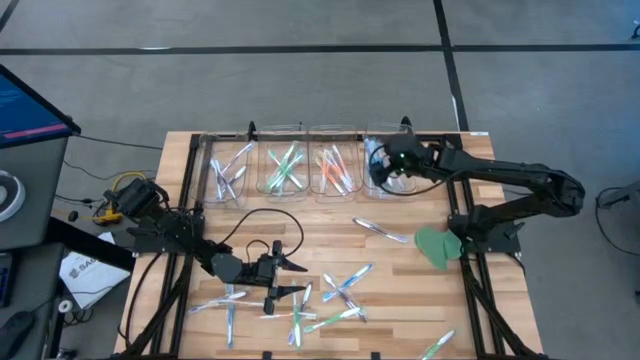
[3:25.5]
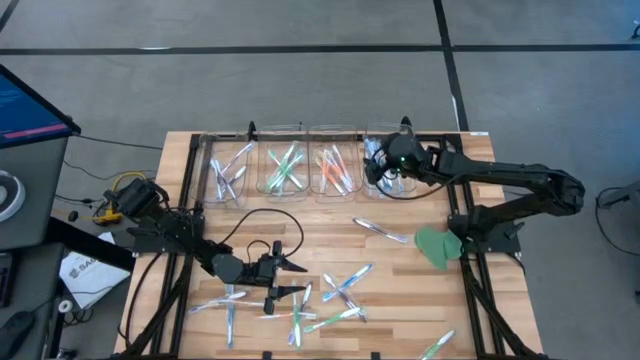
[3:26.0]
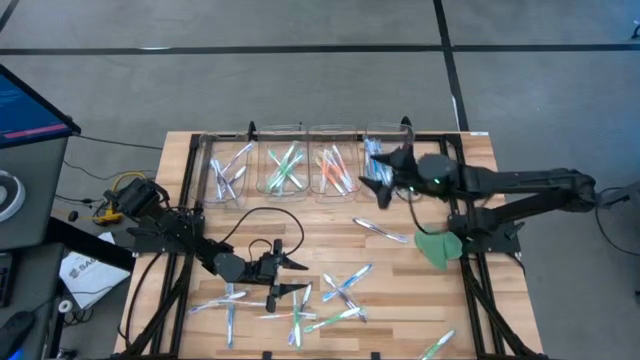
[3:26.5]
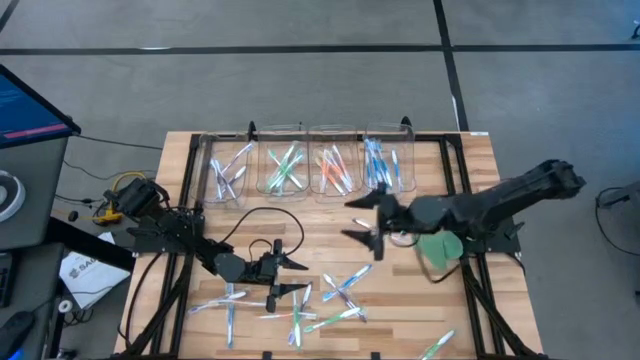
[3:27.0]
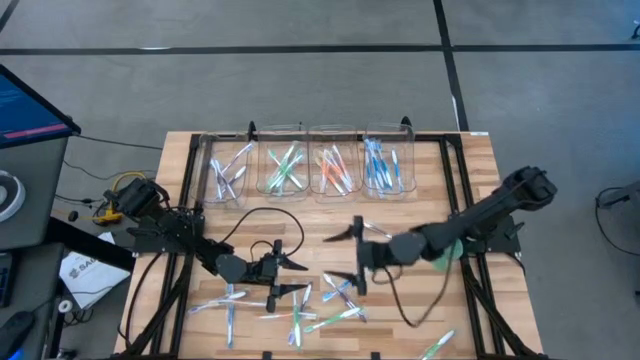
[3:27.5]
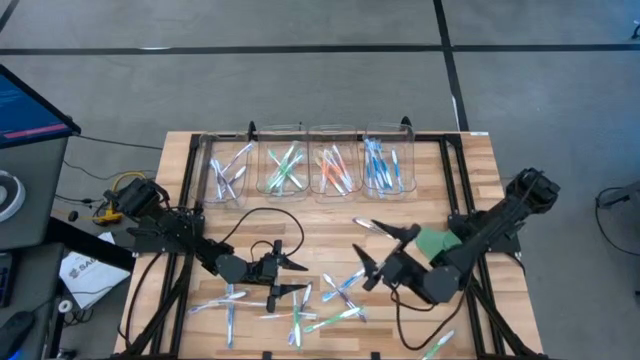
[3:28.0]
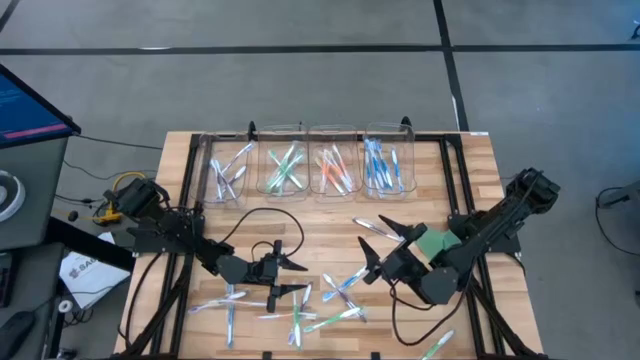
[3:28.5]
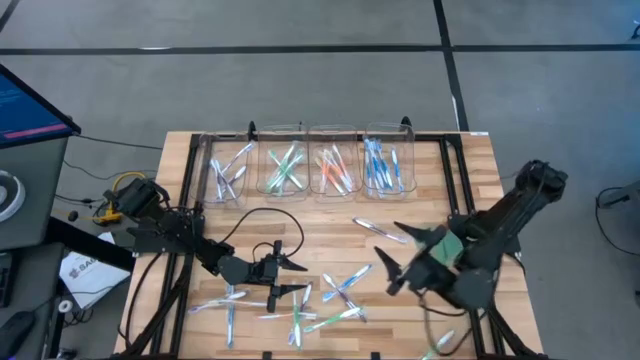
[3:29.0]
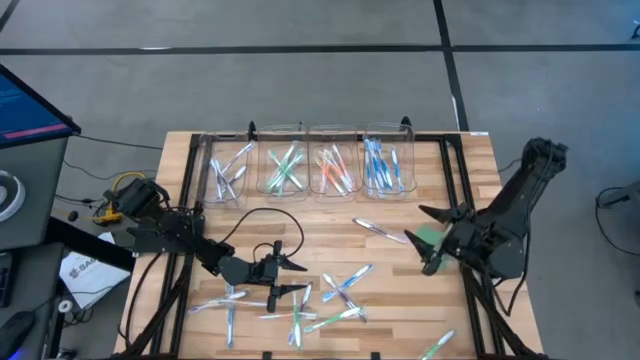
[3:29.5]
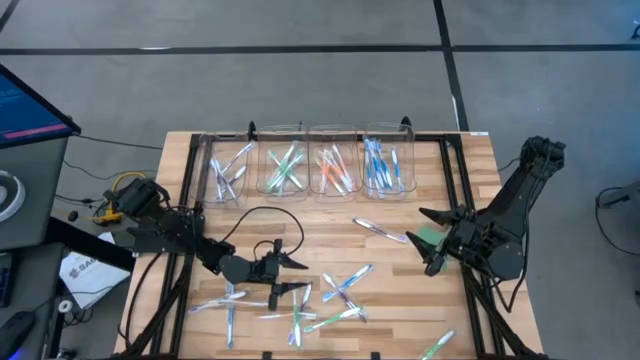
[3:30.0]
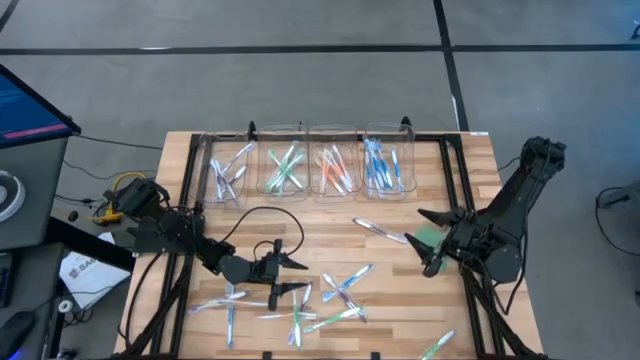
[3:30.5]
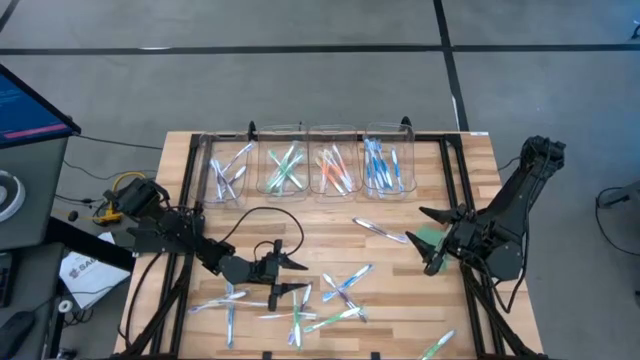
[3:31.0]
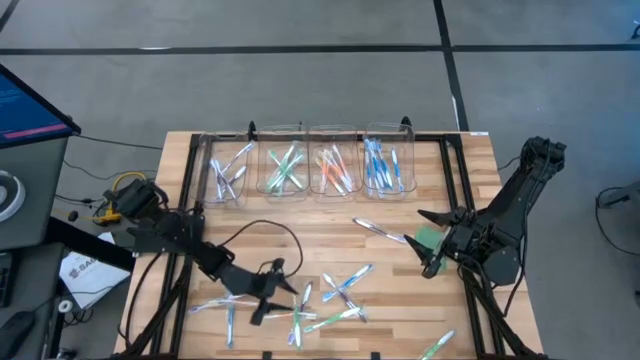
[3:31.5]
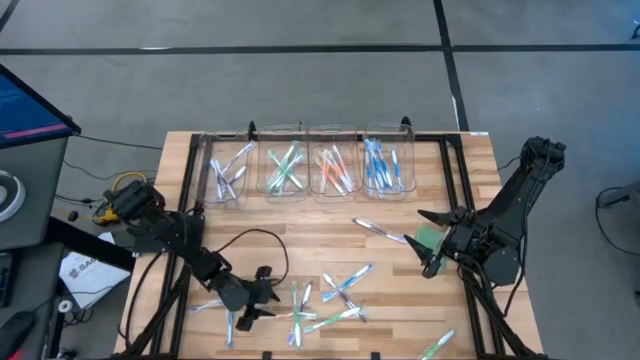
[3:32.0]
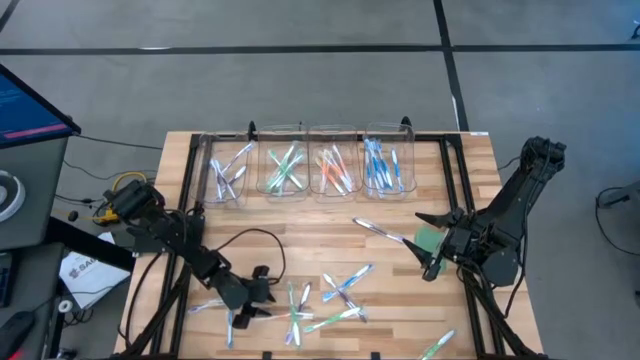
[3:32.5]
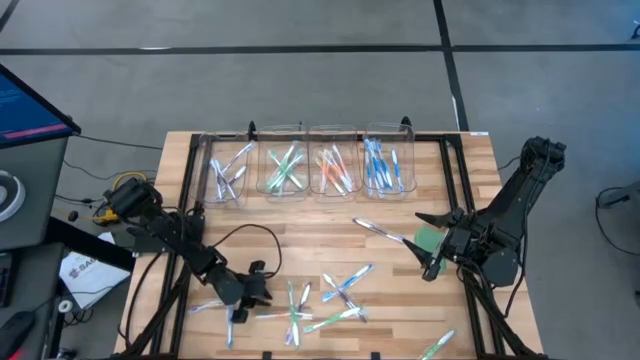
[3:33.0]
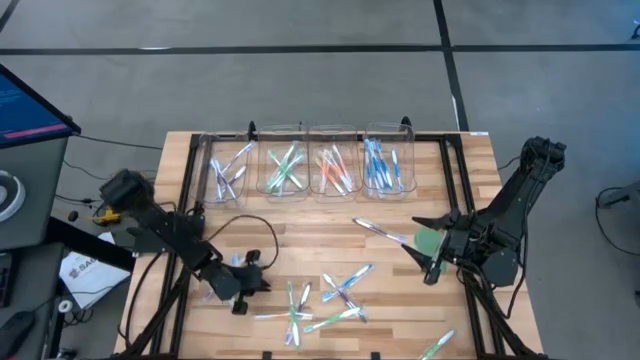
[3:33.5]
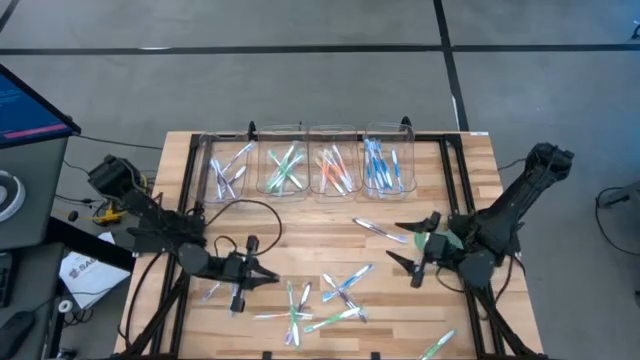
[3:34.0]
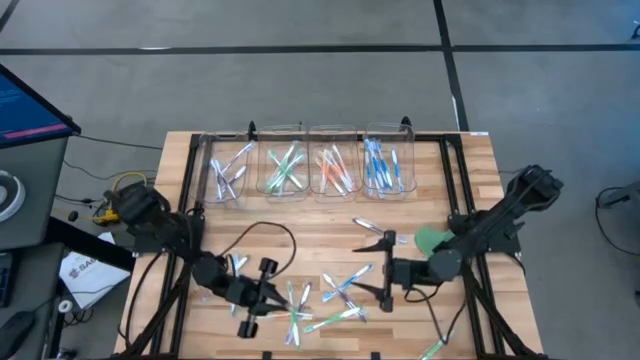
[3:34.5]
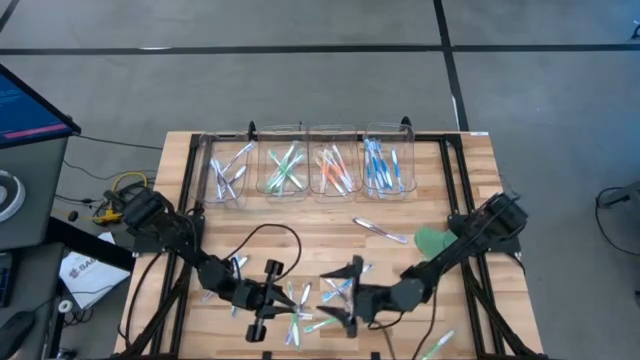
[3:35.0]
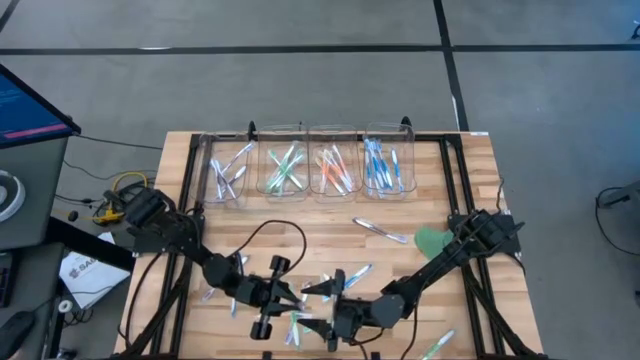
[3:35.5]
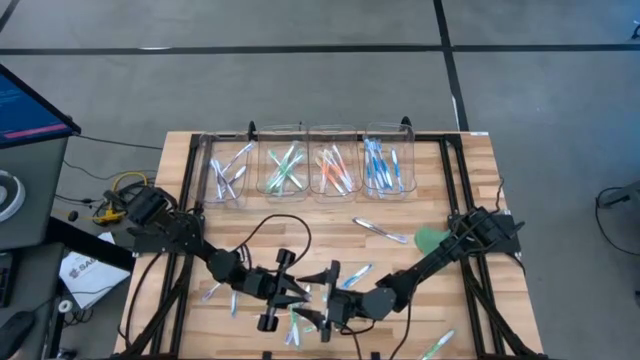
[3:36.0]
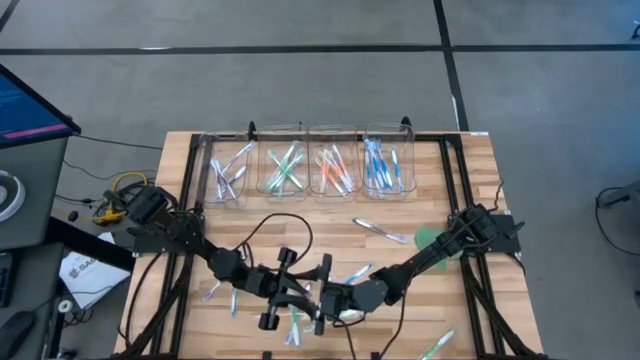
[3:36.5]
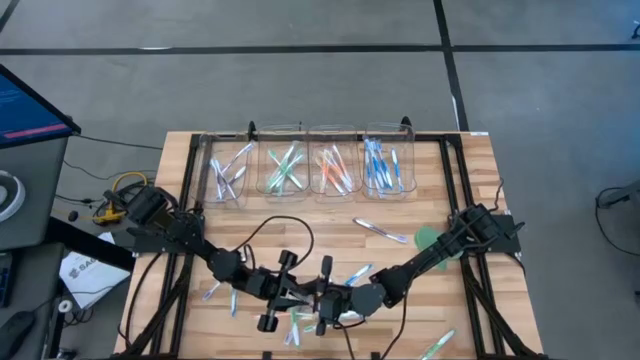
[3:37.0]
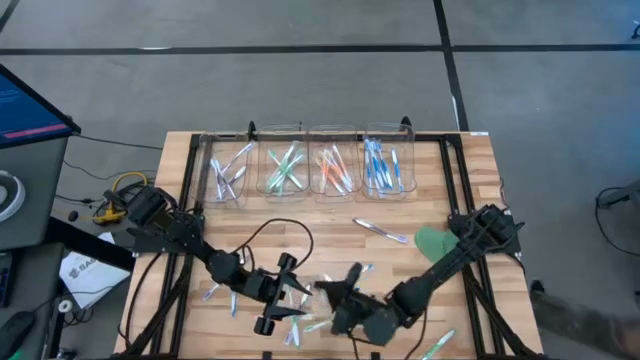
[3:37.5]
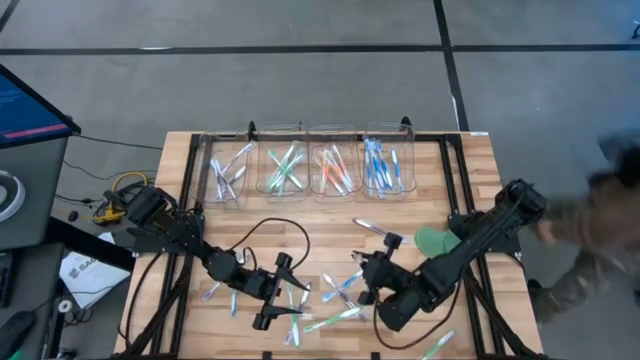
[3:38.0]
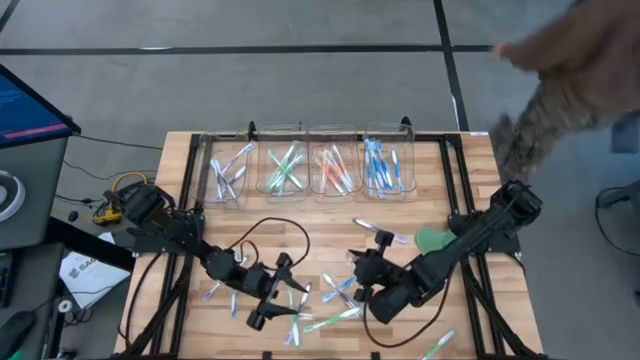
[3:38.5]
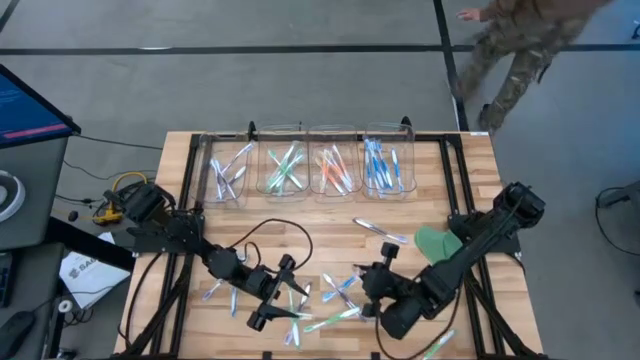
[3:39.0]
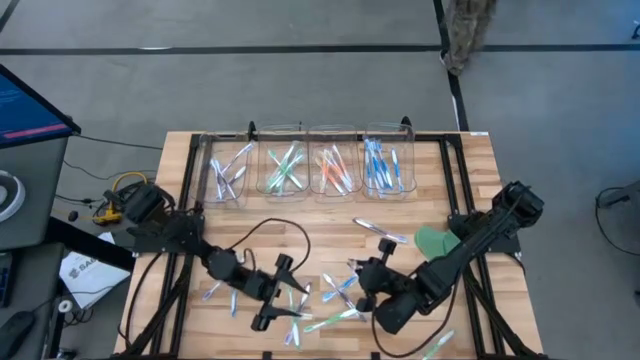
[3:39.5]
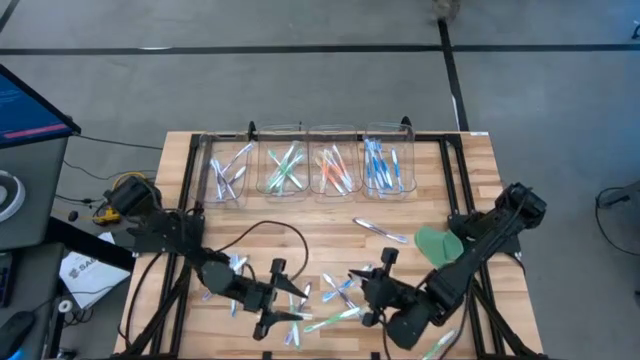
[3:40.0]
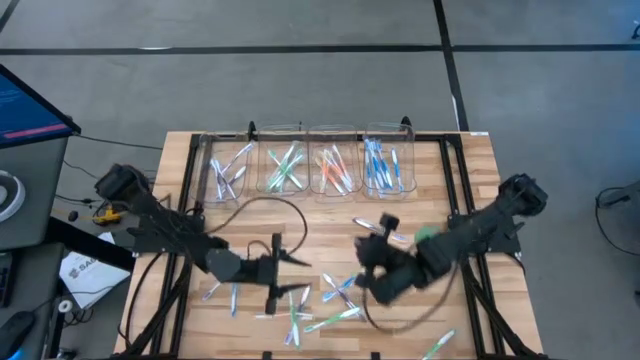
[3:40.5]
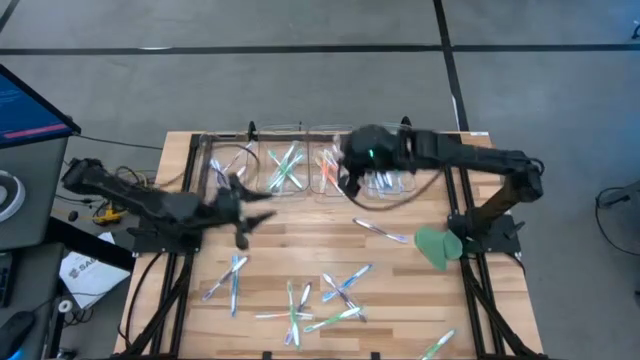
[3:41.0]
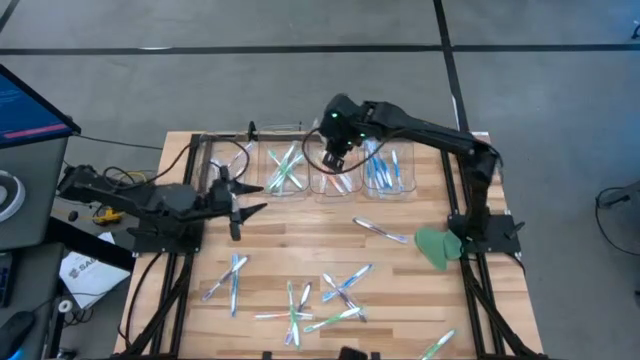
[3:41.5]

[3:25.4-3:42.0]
Task: Pick & Place Toothbrushes
Put the orange toothbrush into the middle right transparent bin

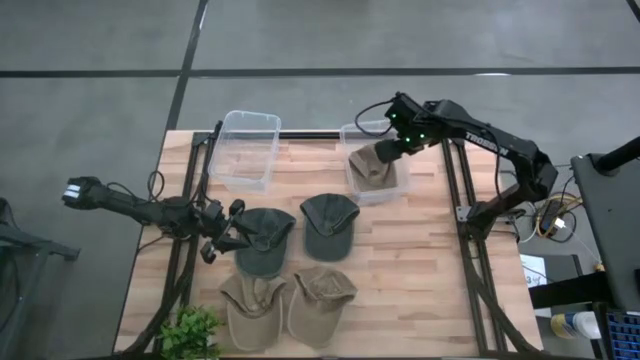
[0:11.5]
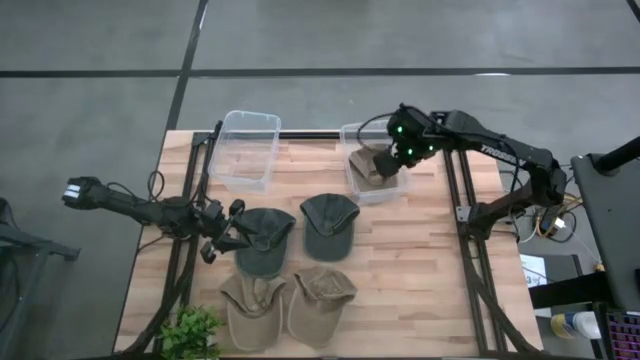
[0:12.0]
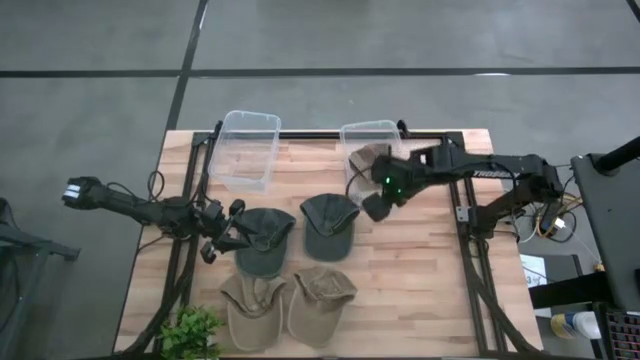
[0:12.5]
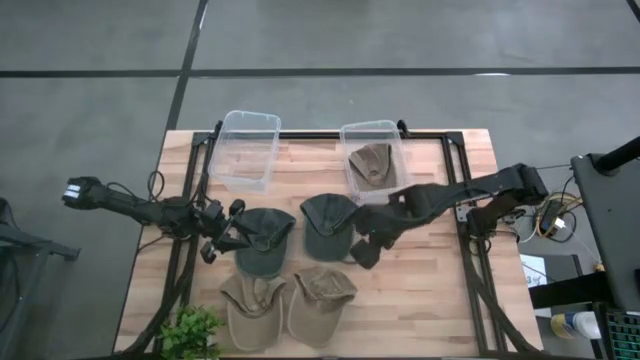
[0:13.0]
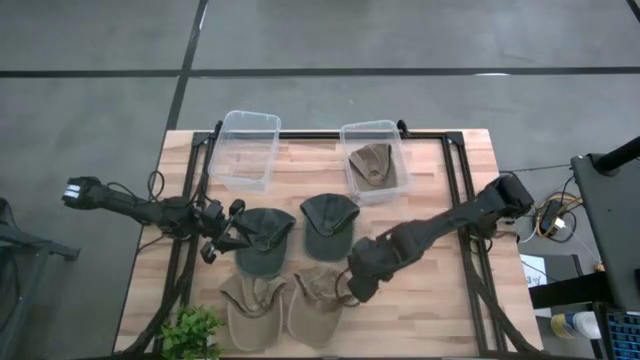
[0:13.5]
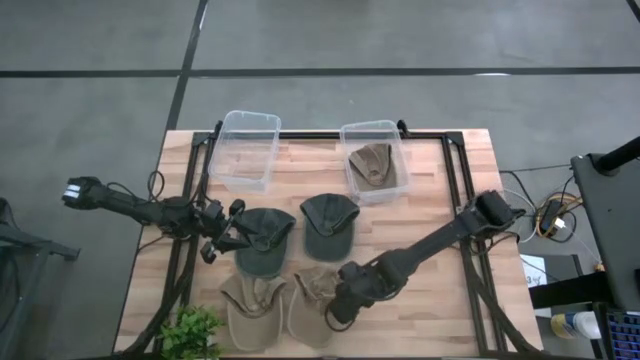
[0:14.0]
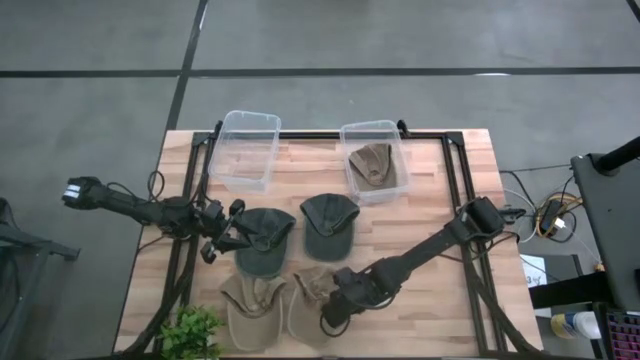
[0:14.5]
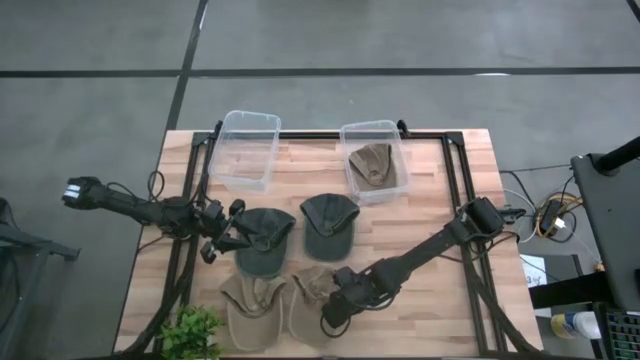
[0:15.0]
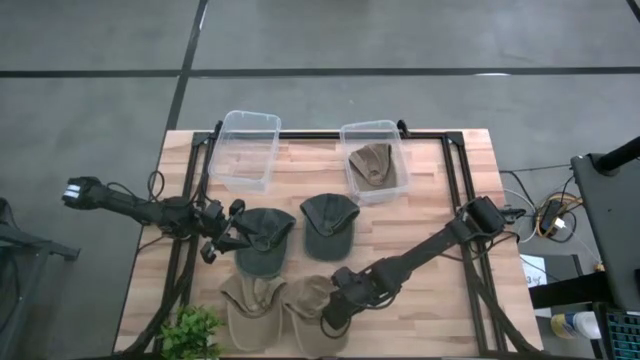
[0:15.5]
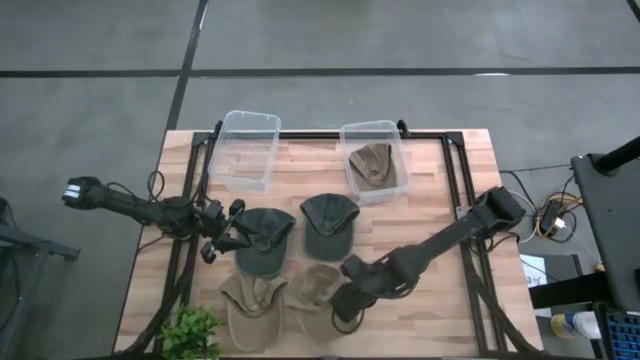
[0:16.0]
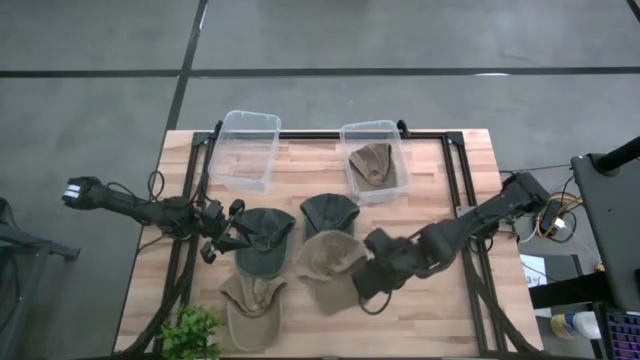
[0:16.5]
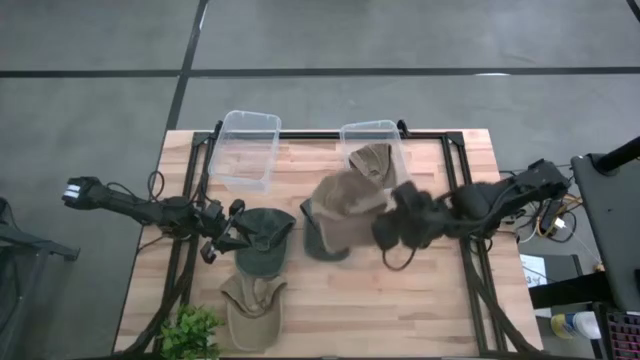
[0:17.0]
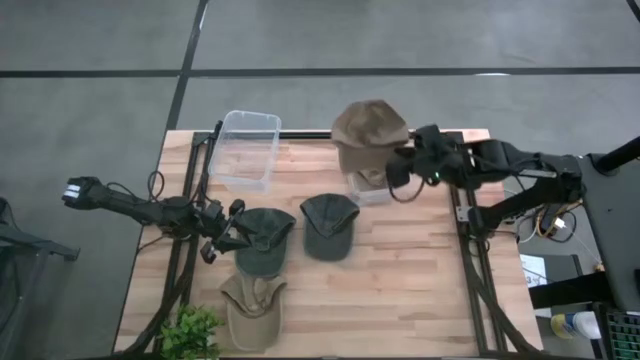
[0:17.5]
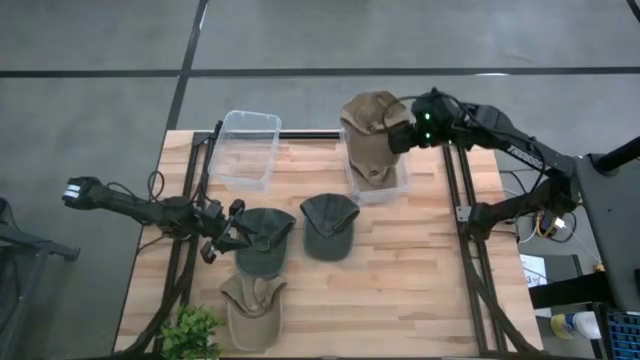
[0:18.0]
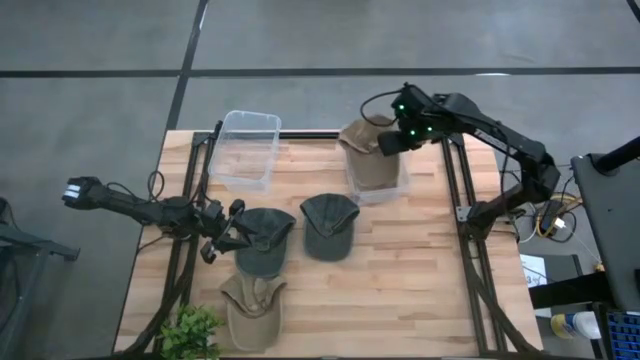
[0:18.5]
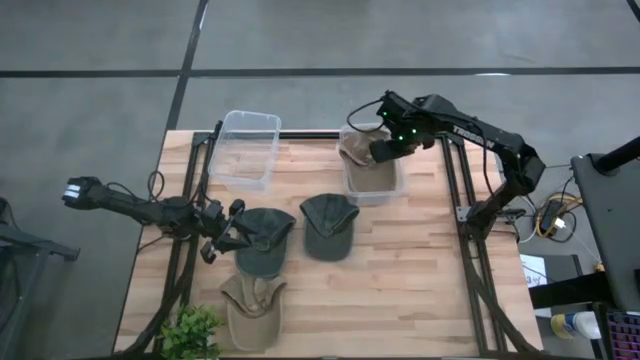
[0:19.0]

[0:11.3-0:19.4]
Task: Pick & Place hat
Put the right brown cap into the right transparent bin
